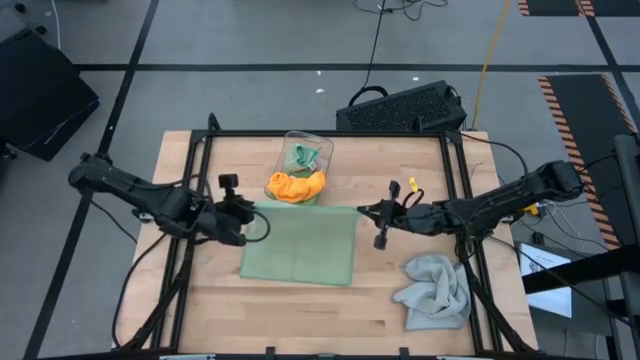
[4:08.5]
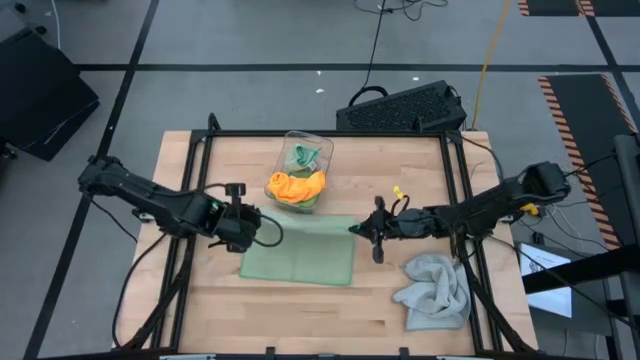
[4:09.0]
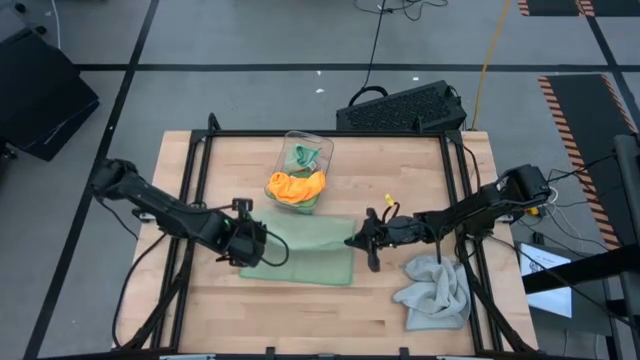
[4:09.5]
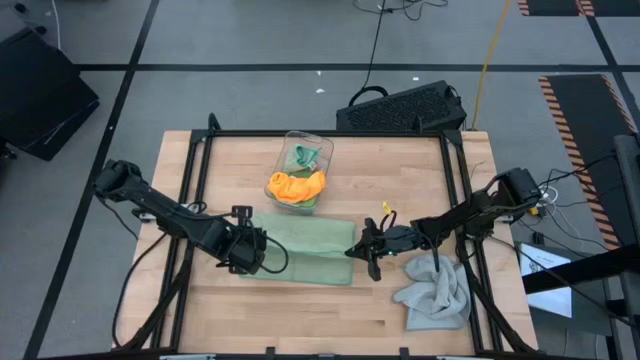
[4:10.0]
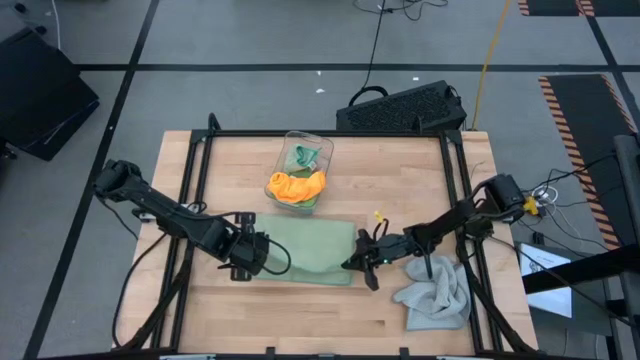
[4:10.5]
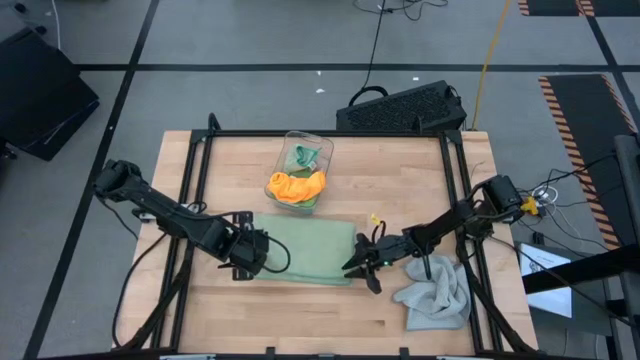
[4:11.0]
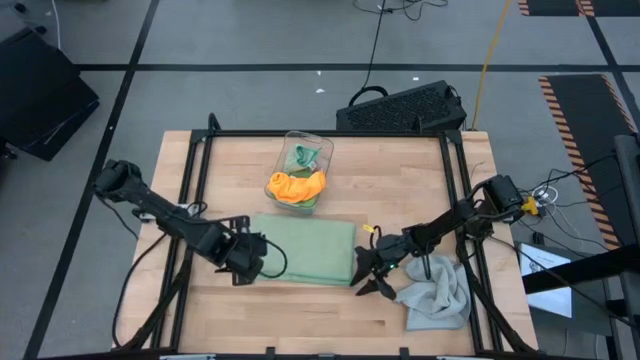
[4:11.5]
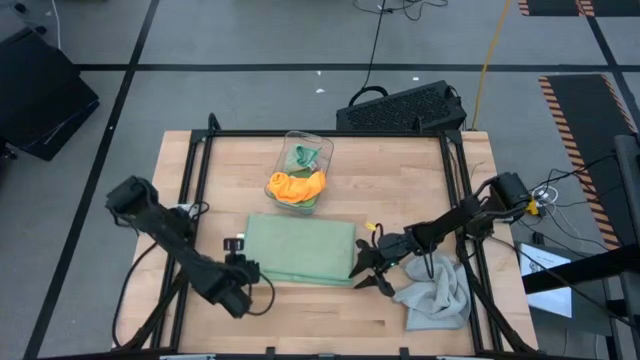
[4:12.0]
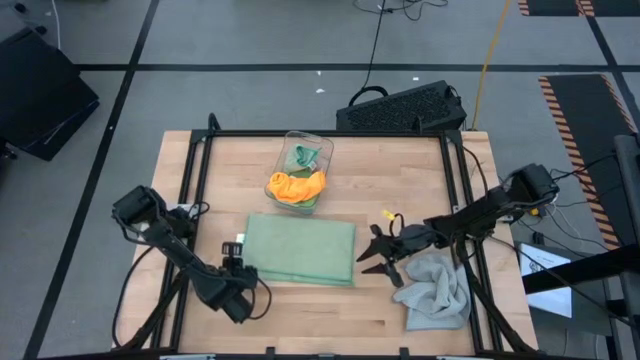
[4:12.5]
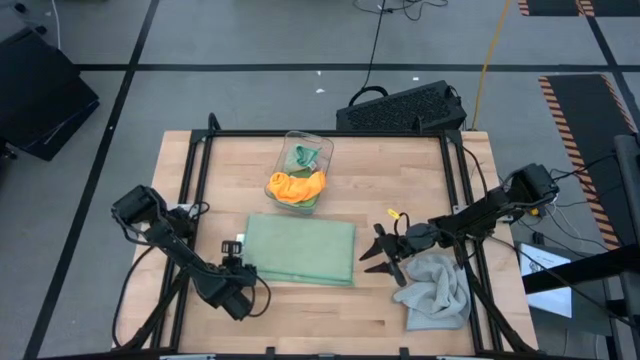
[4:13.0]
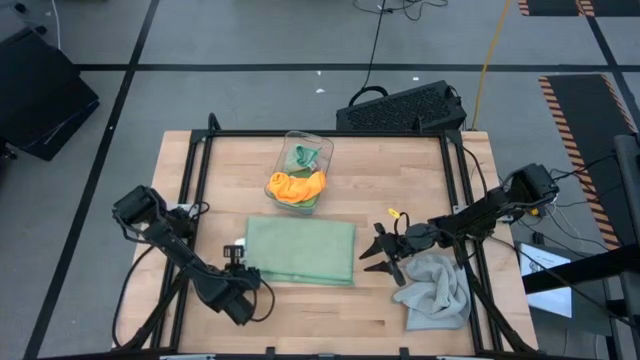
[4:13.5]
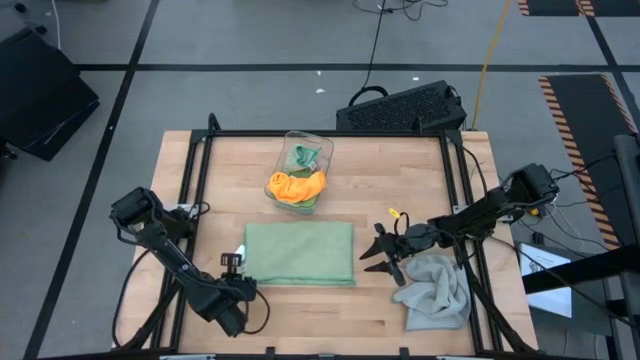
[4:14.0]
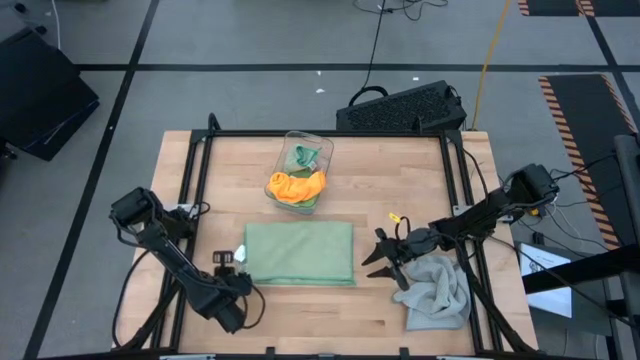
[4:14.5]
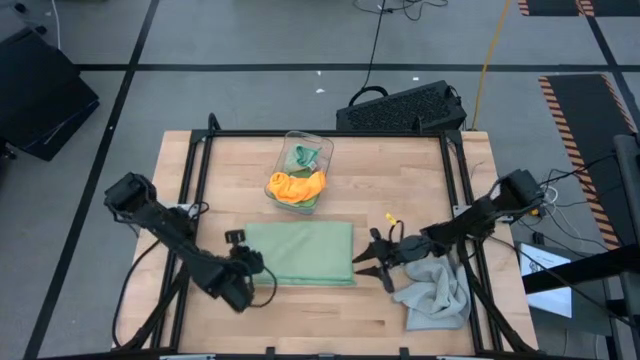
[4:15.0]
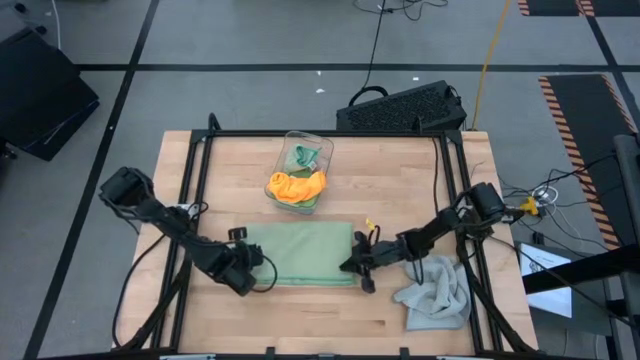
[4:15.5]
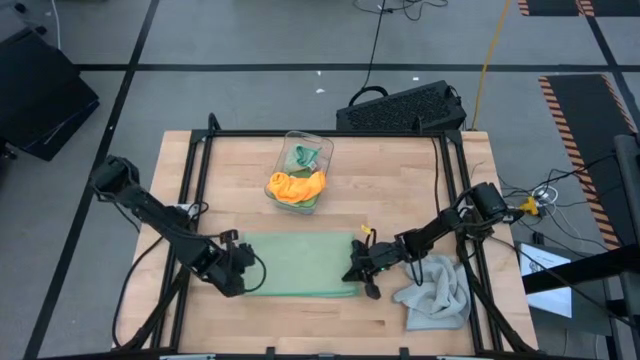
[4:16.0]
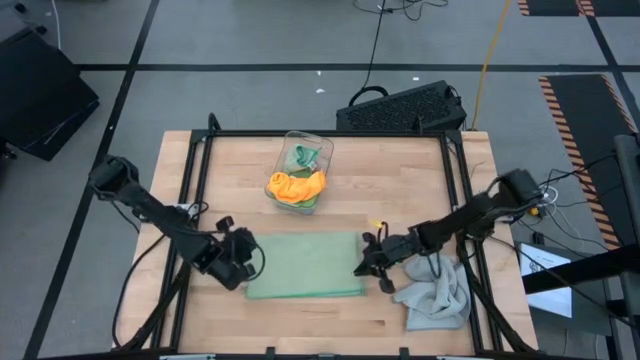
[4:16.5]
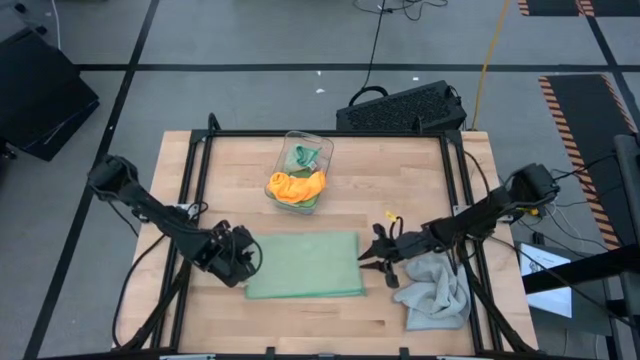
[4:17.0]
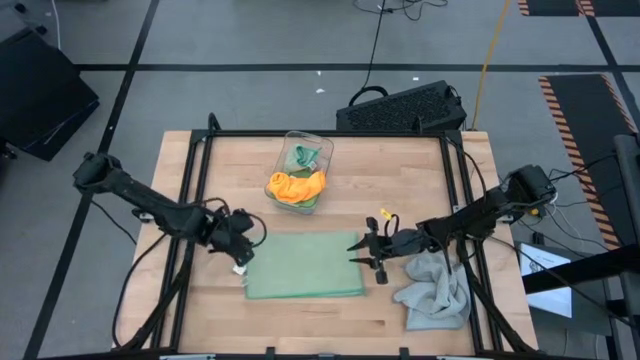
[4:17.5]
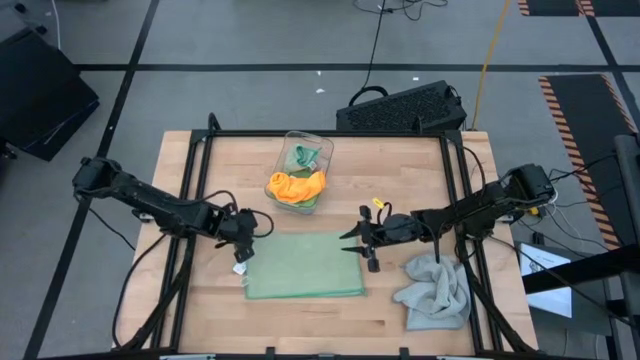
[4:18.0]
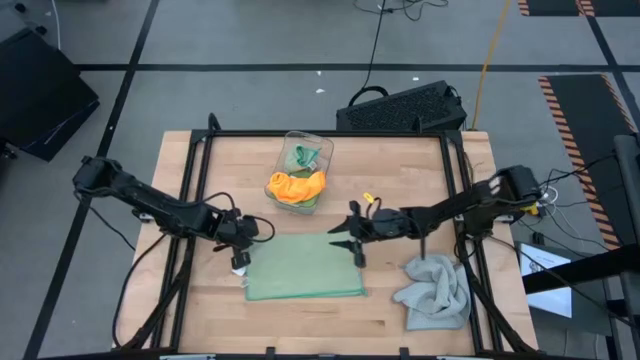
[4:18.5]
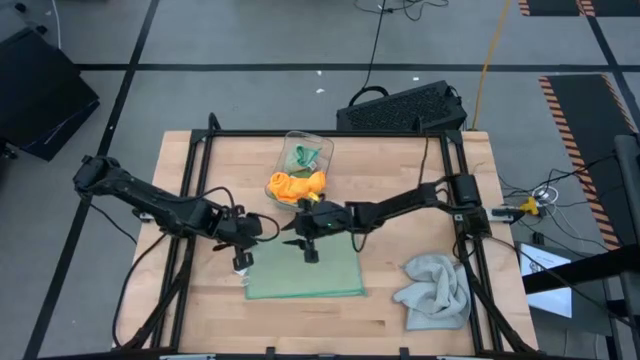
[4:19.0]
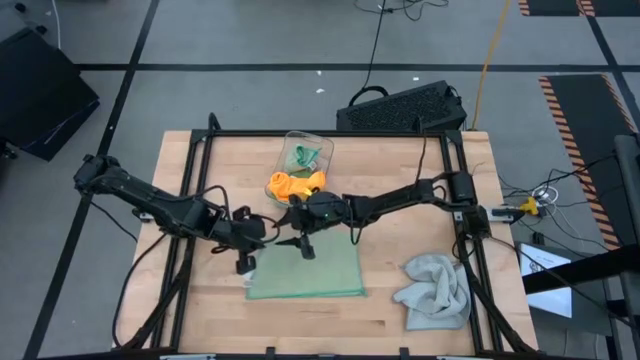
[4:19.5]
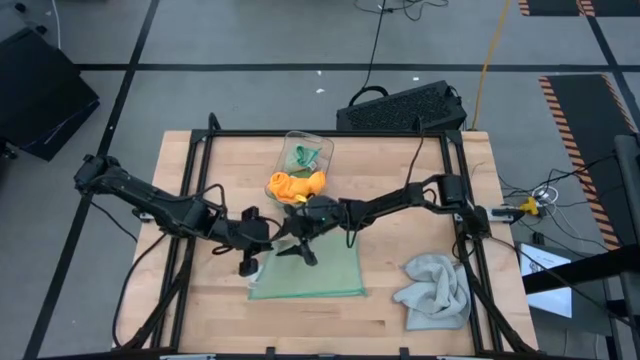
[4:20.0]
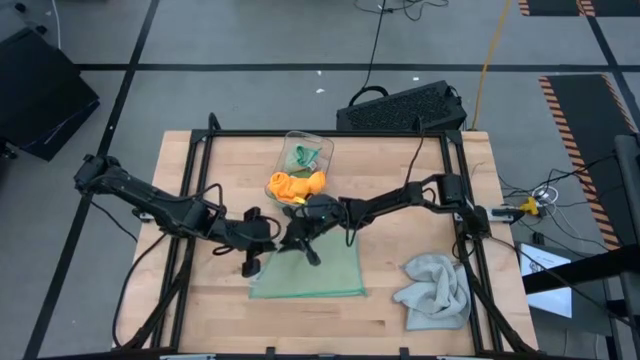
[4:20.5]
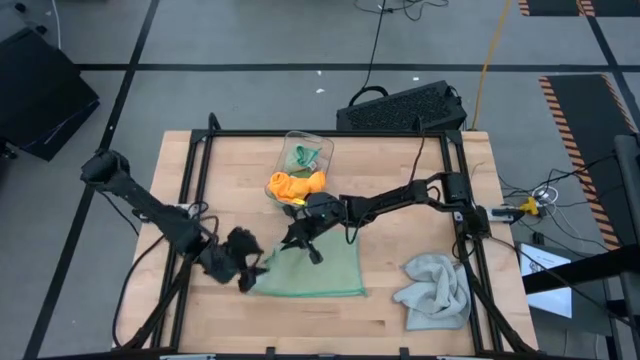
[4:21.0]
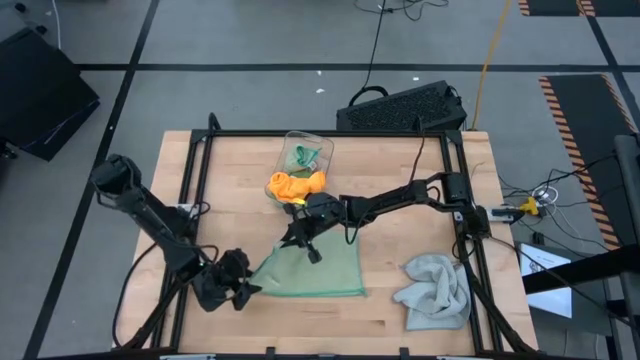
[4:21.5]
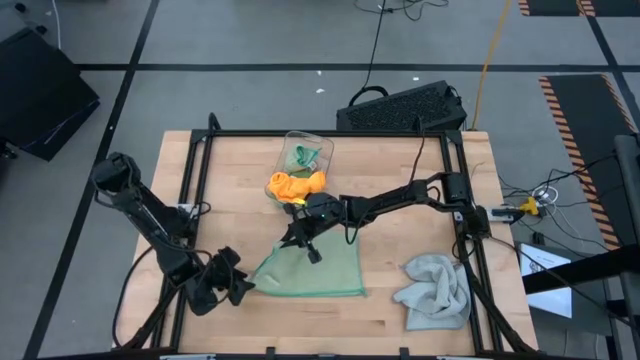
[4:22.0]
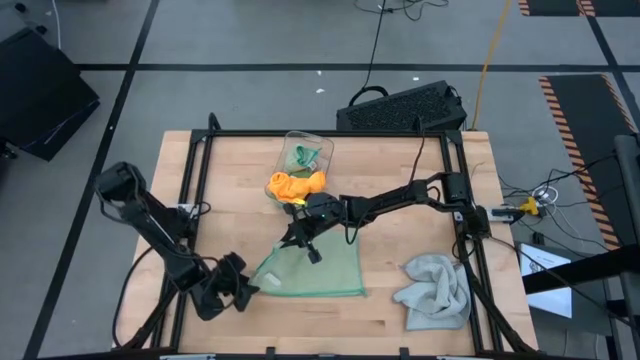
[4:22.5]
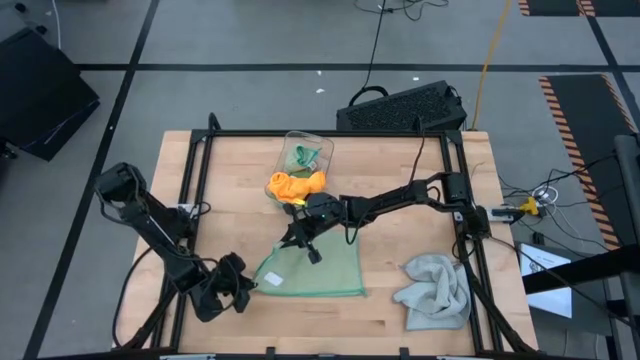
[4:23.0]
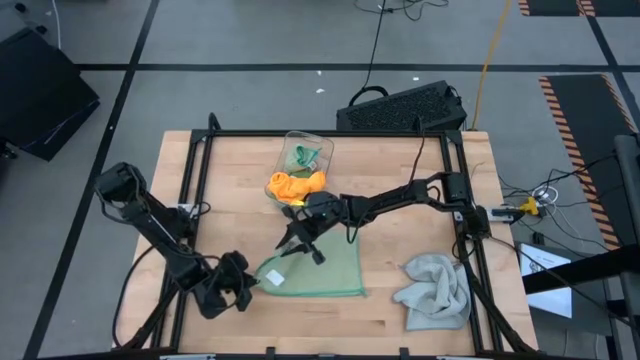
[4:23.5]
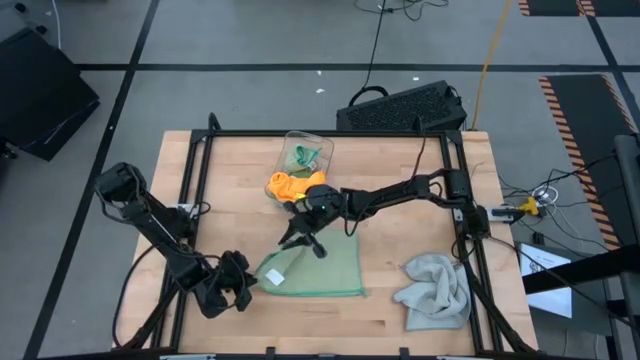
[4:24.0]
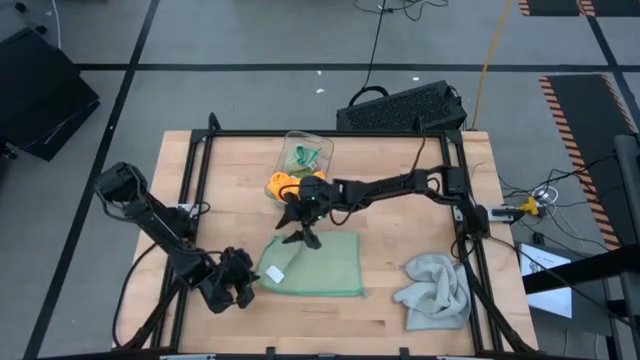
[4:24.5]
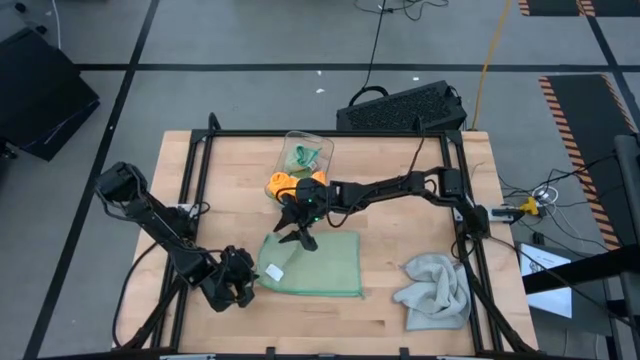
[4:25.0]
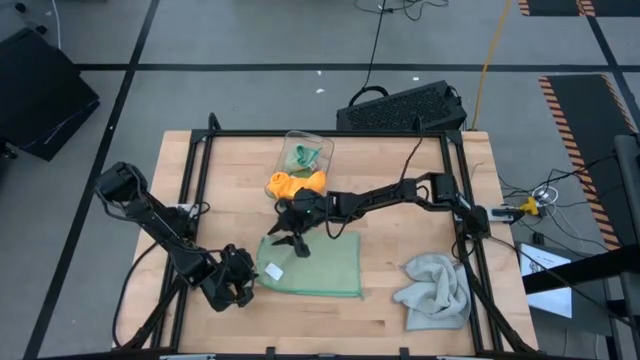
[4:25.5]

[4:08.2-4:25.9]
Task: Fold microfiber towels
Fold the light green towel
